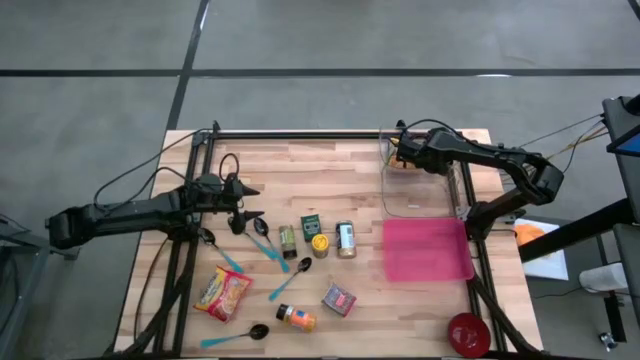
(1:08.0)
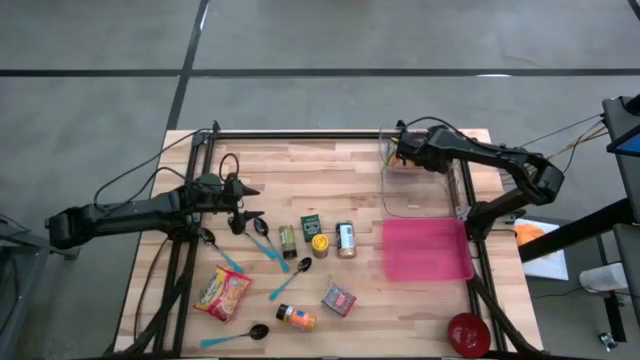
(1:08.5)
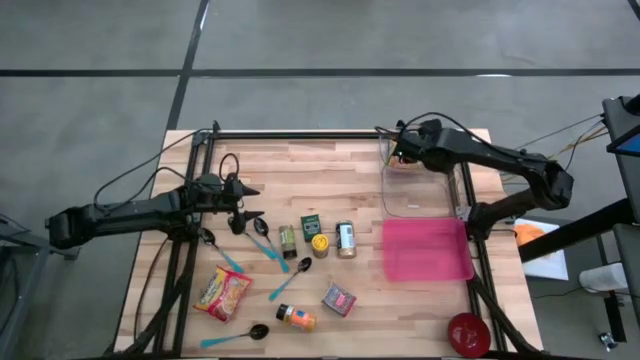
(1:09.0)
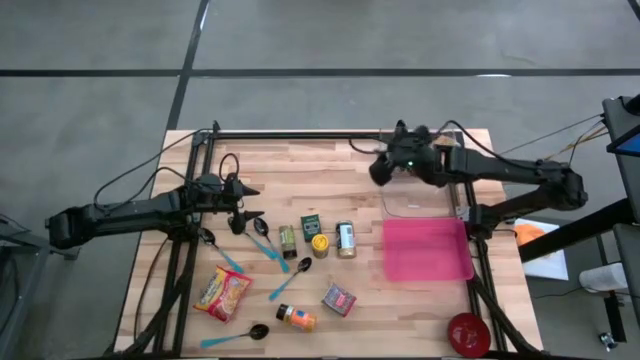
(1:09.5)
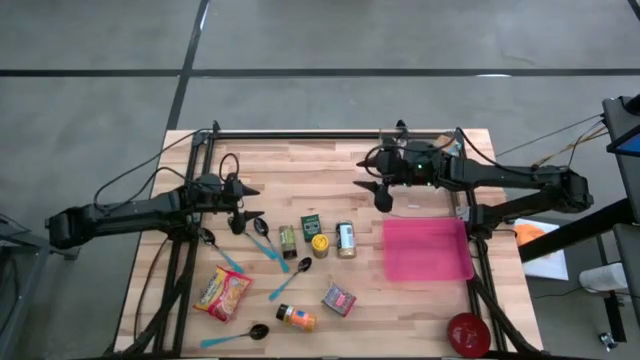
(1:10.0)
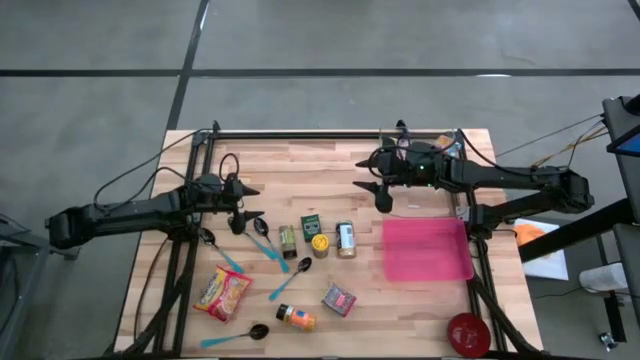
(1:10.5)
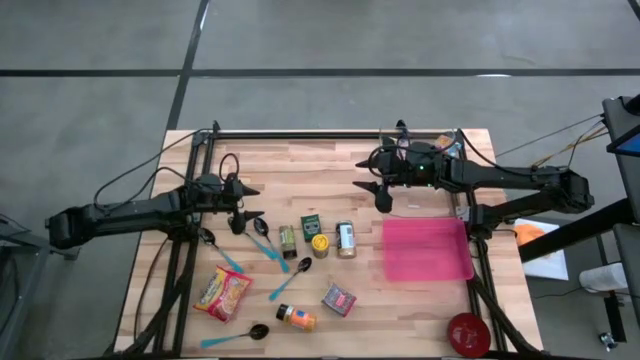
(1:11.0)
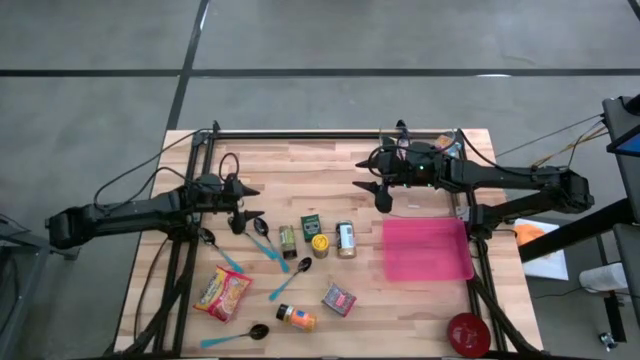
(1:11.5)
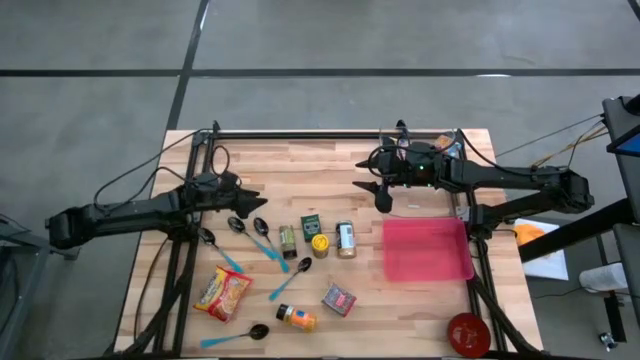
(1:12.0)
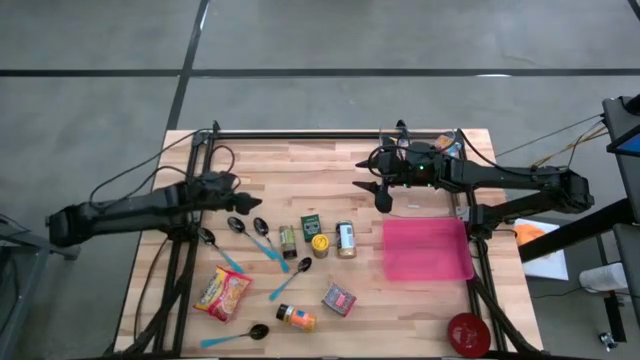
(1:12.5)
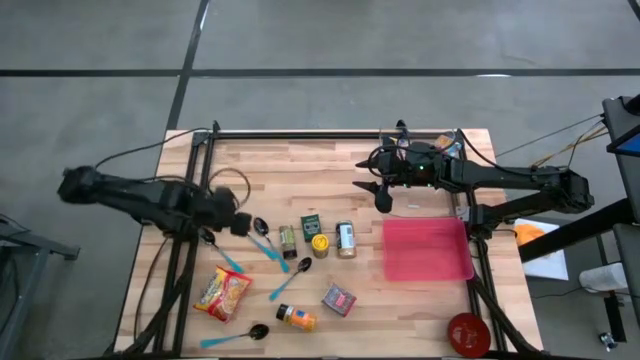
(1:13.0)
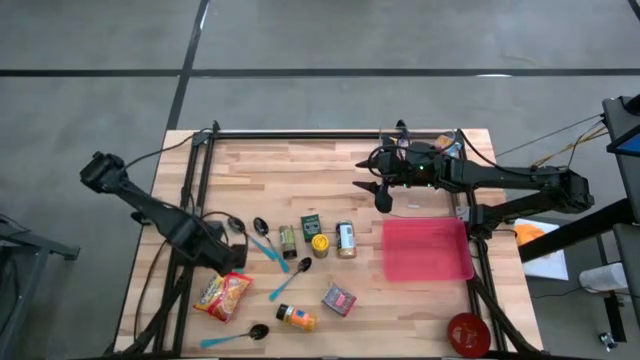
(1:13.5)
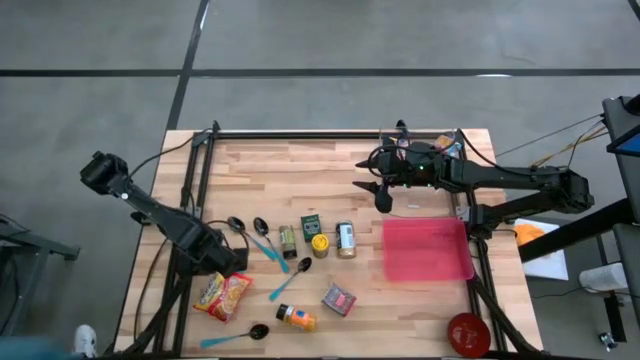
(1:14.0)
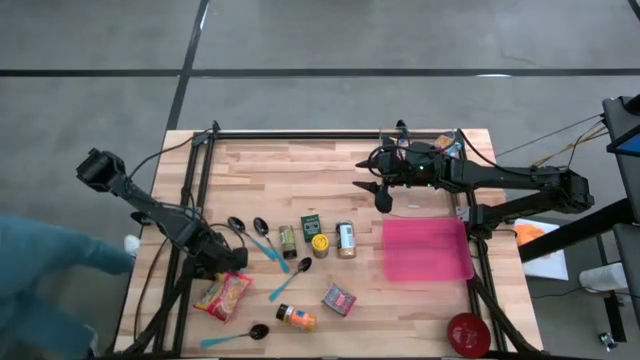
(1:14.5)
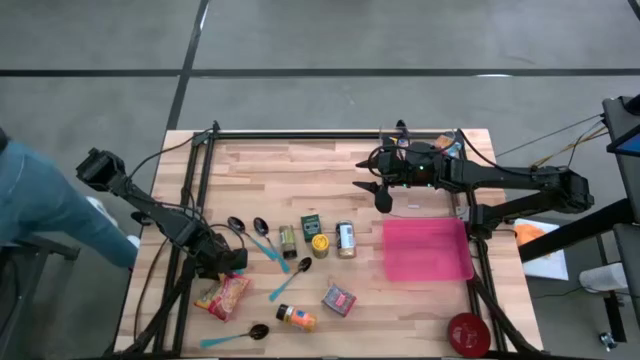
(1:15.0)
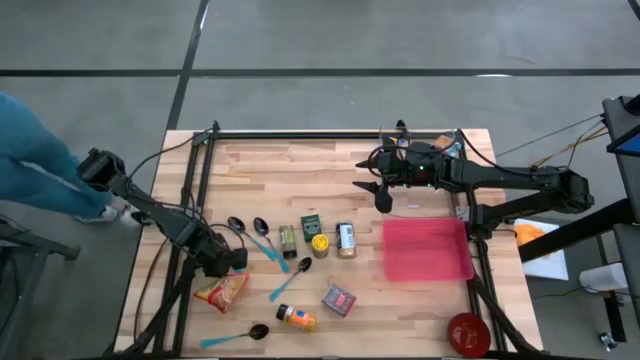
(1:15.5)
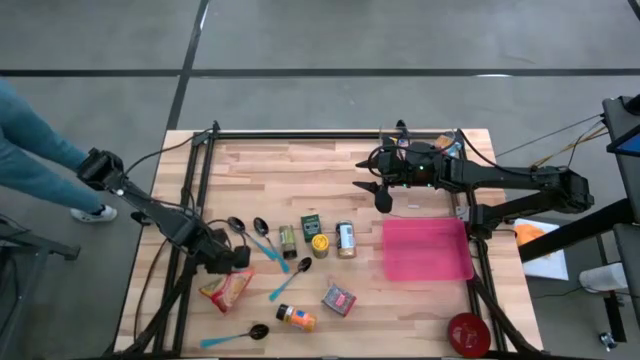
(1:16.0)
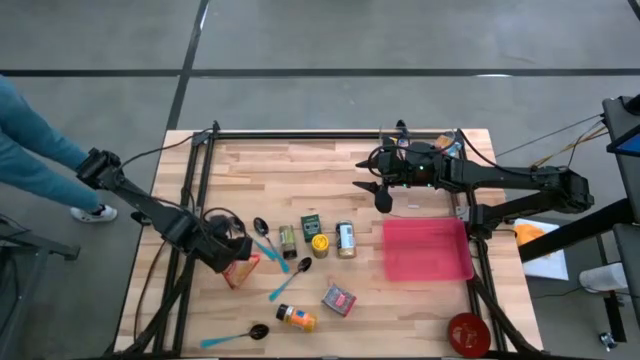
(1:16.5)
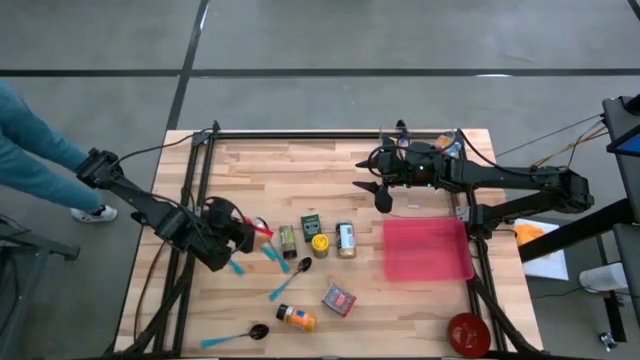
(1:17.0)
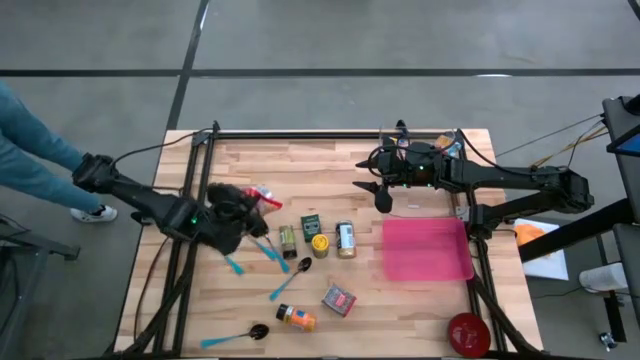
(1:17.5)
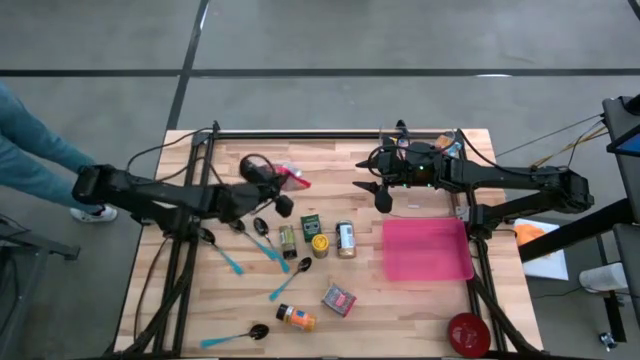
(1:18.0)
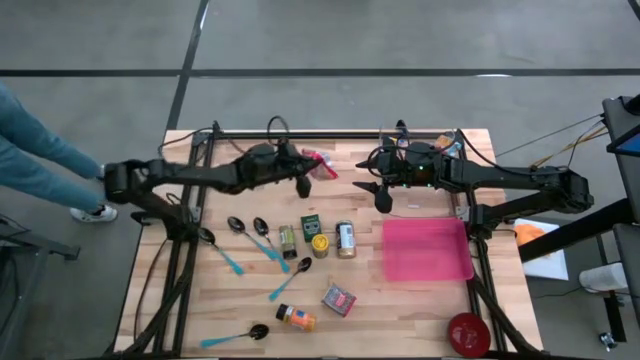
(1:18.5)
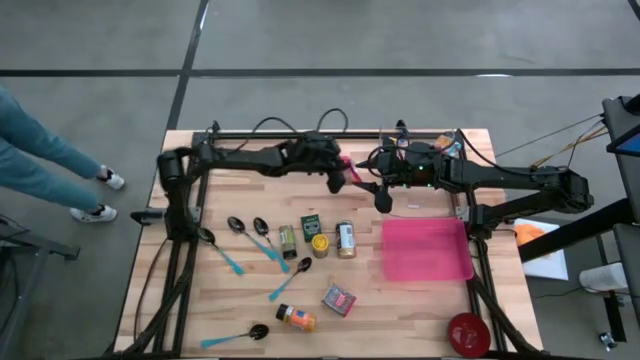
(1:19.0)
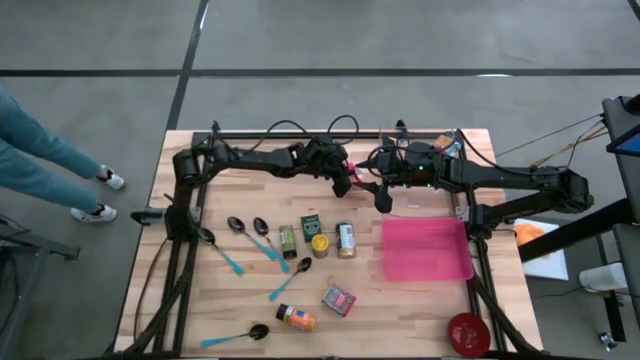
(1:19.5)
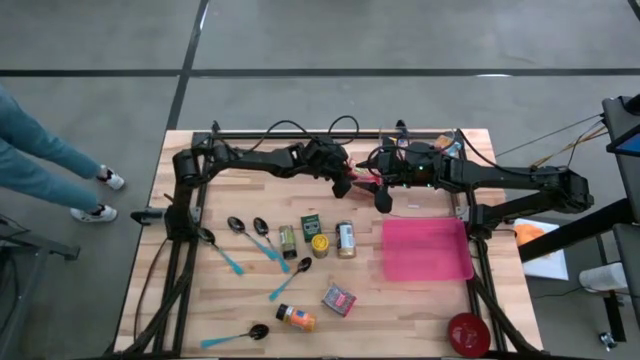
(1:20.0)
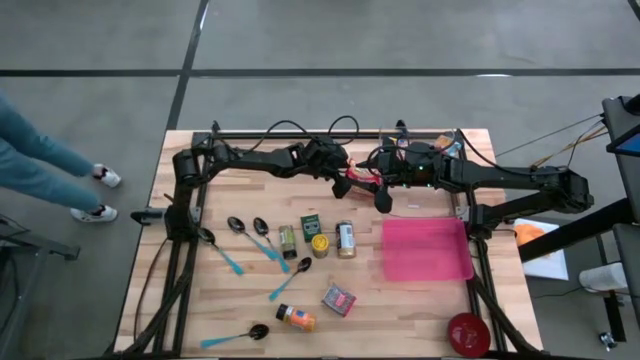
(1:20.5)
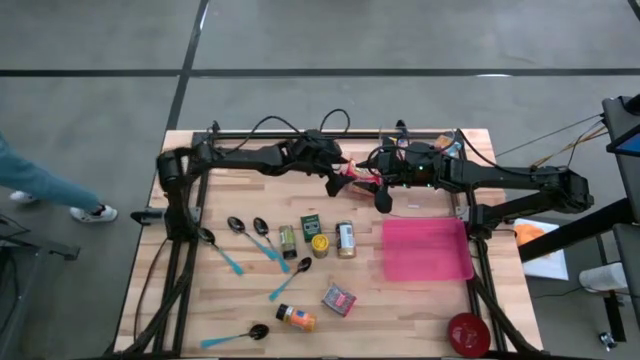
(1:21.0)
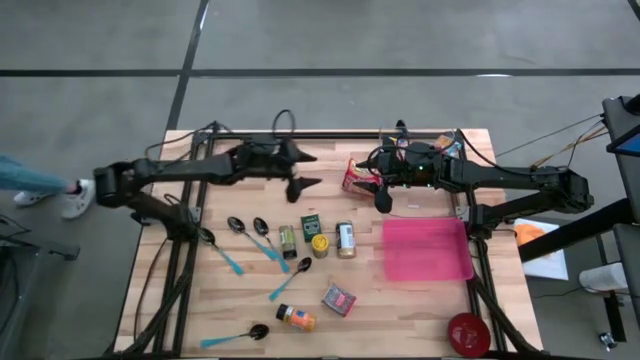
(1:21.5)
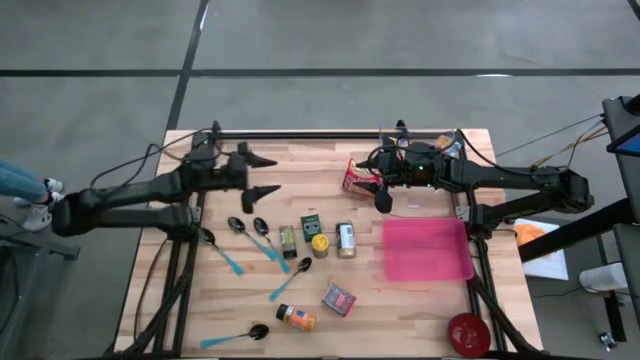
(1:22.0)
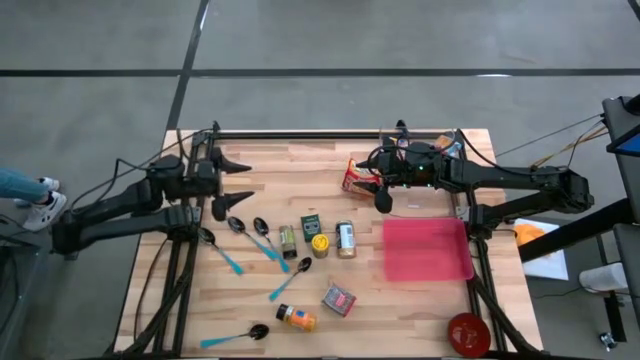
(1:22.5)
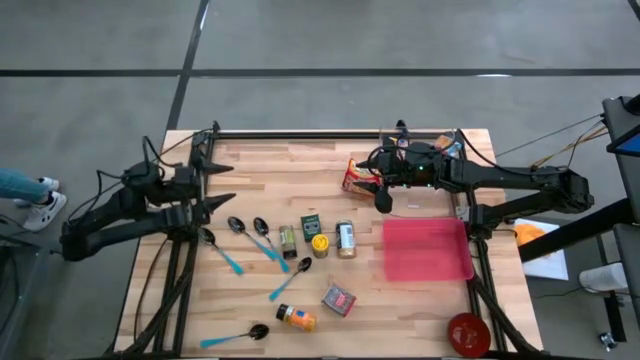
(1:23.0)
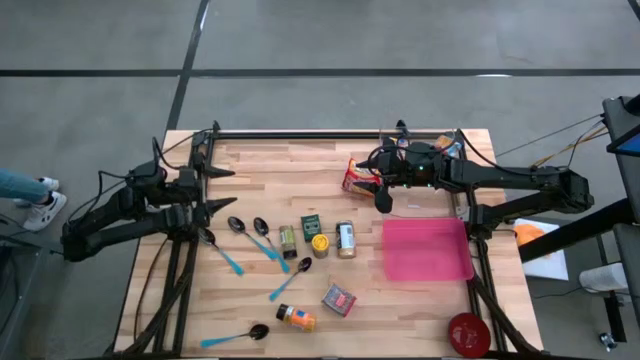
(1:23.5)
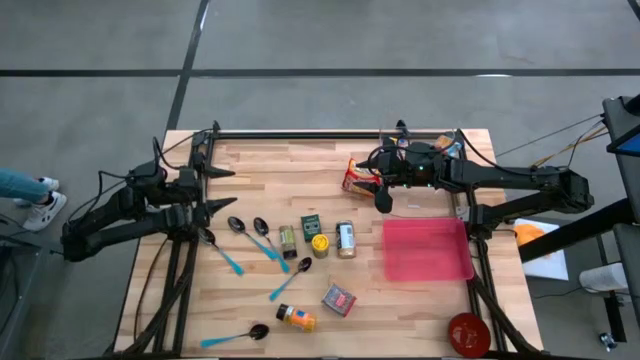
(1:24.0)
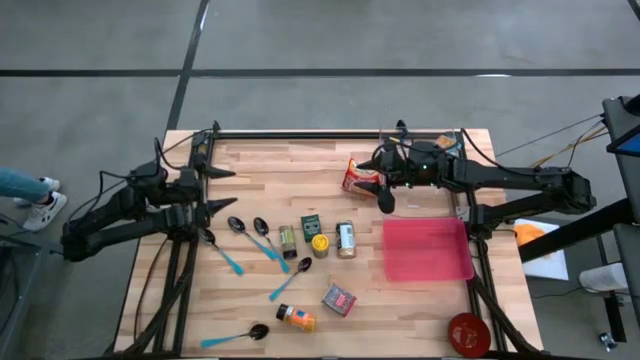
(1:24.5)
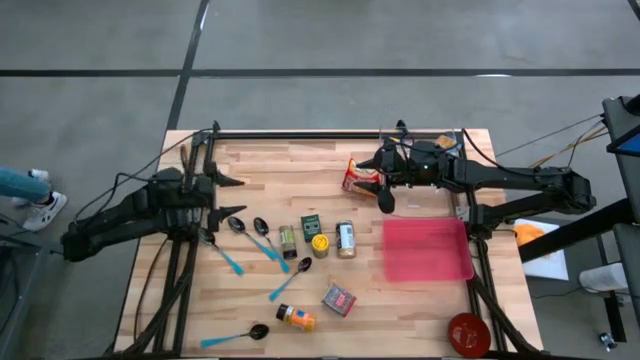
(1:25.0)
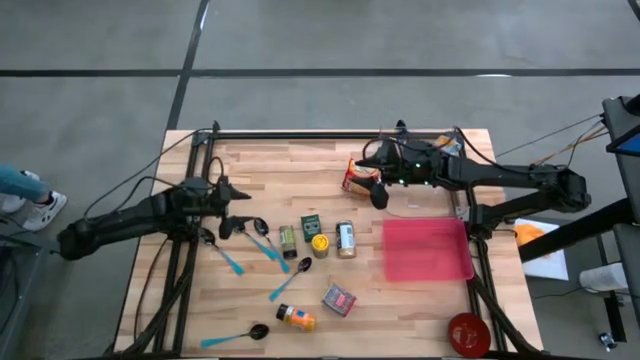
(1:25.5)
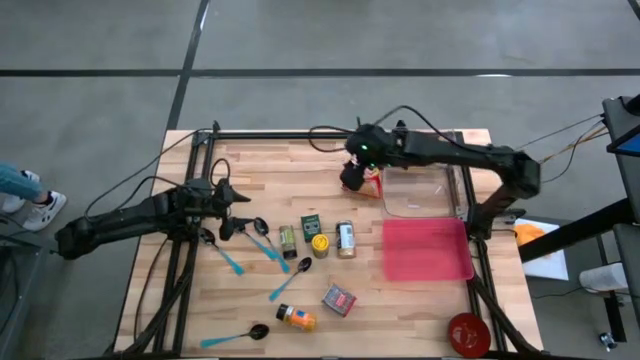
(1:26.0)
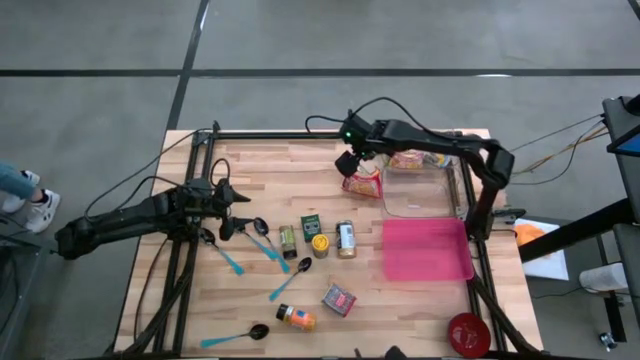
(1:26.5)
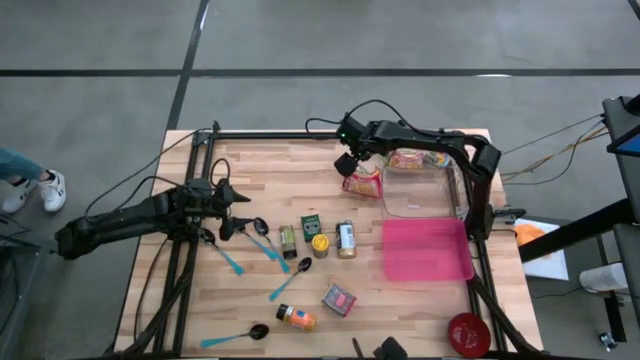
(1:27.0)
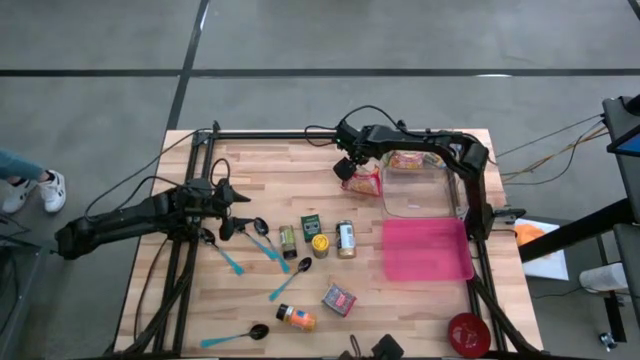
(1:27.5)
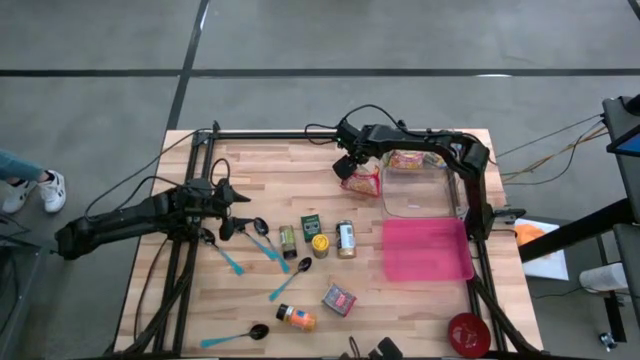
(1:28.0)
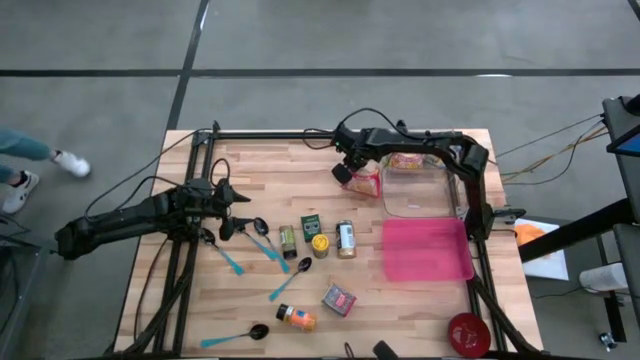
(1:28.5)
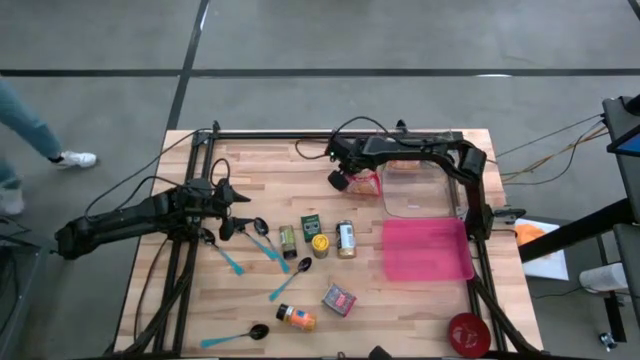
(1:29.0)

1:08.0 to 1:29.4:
Put the red noodle pack into the top transparent bin
